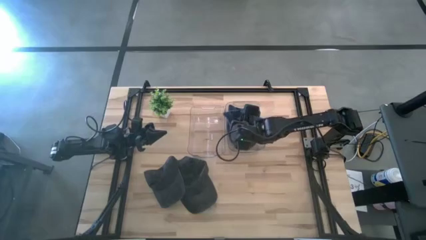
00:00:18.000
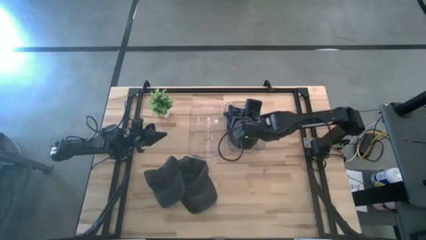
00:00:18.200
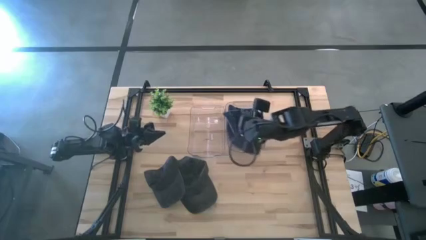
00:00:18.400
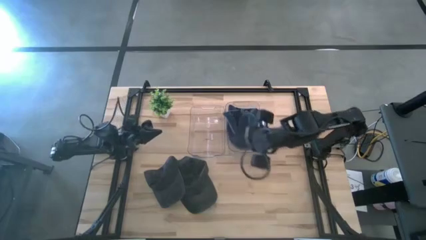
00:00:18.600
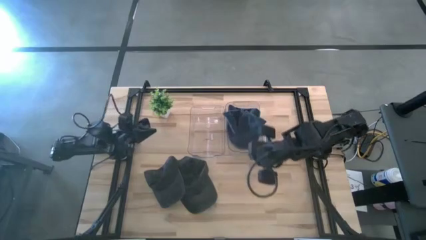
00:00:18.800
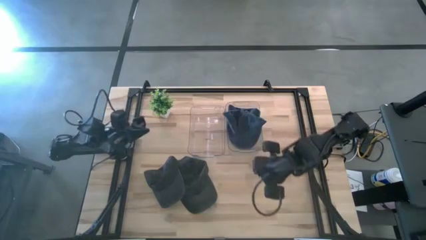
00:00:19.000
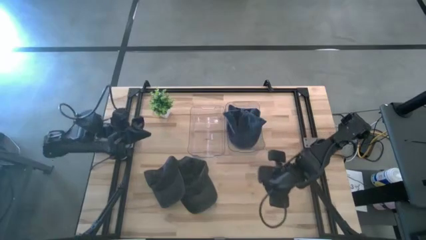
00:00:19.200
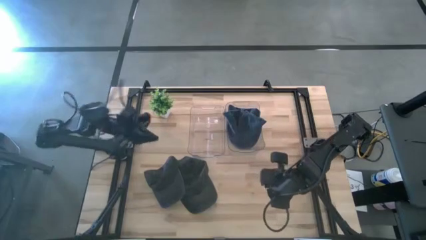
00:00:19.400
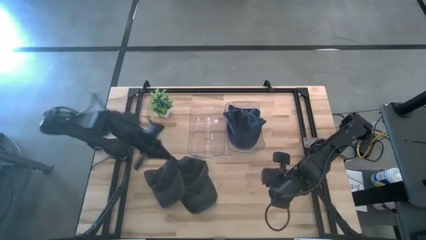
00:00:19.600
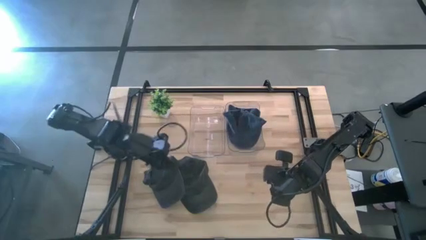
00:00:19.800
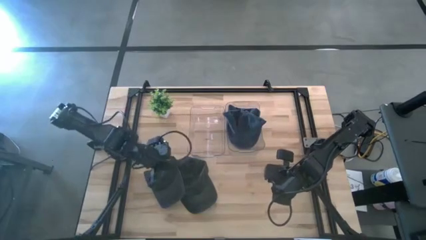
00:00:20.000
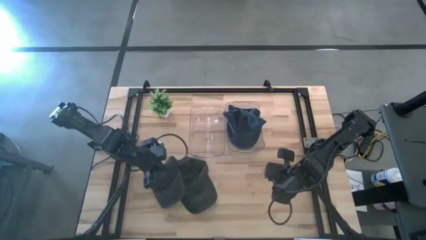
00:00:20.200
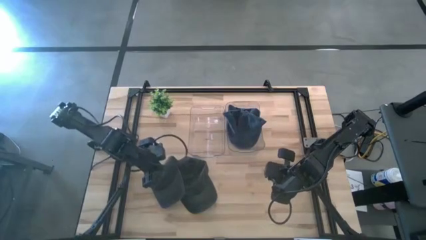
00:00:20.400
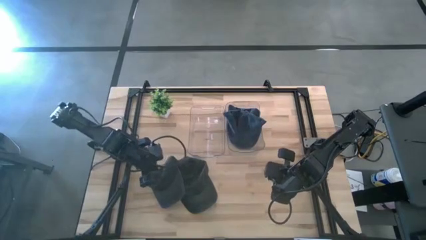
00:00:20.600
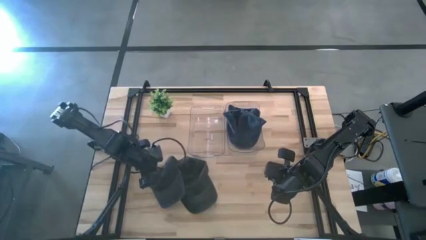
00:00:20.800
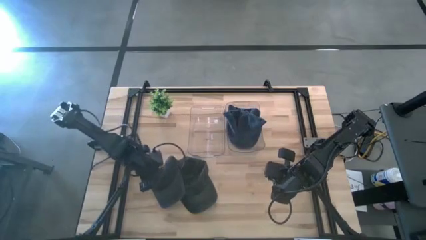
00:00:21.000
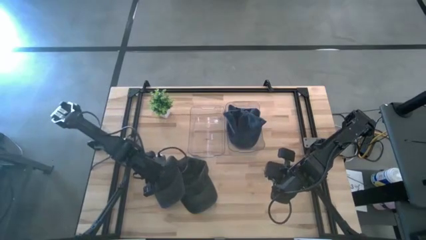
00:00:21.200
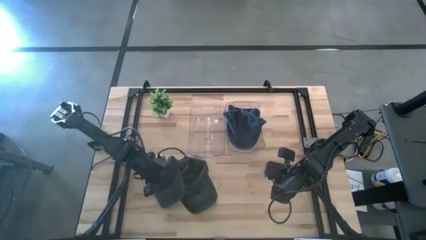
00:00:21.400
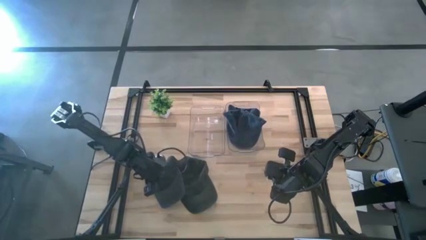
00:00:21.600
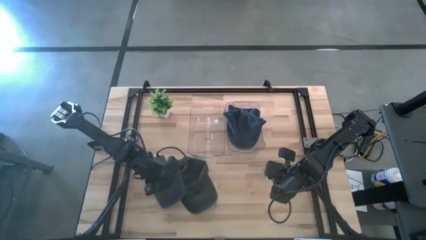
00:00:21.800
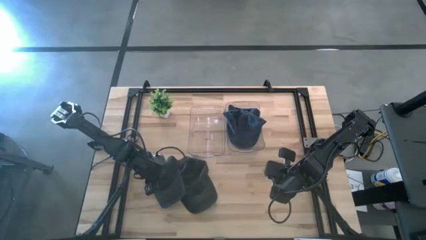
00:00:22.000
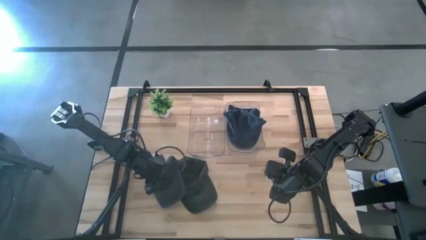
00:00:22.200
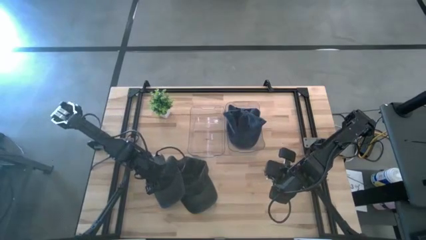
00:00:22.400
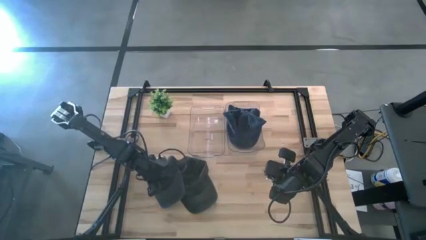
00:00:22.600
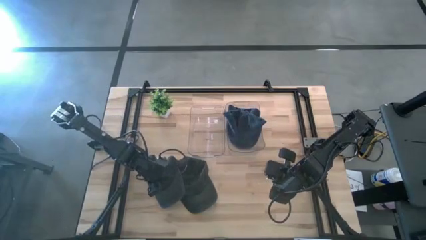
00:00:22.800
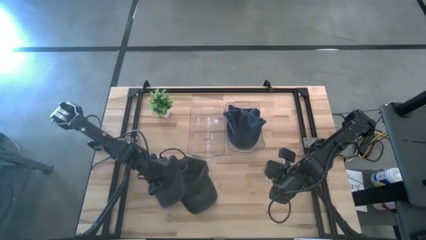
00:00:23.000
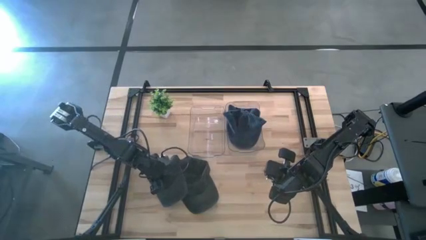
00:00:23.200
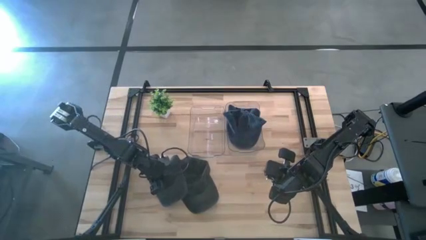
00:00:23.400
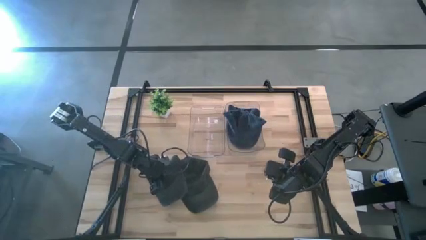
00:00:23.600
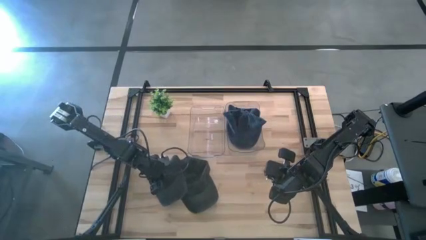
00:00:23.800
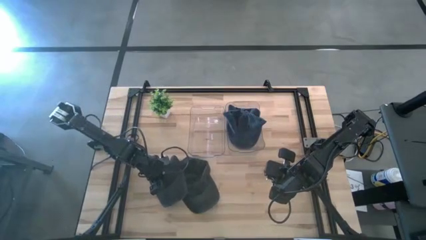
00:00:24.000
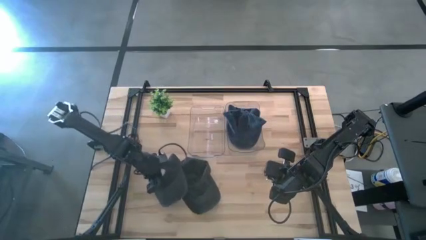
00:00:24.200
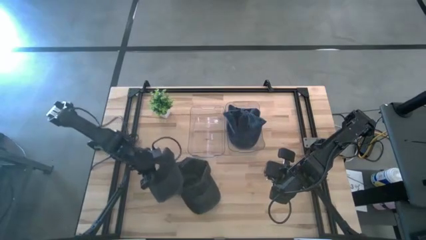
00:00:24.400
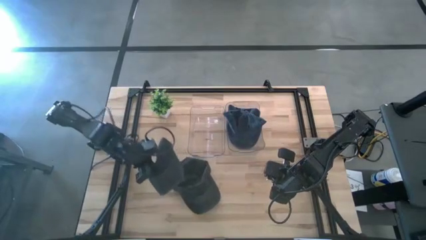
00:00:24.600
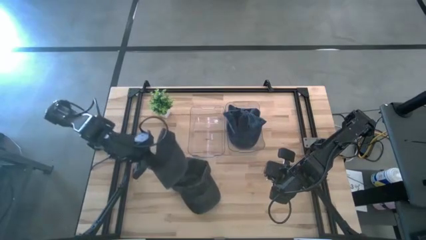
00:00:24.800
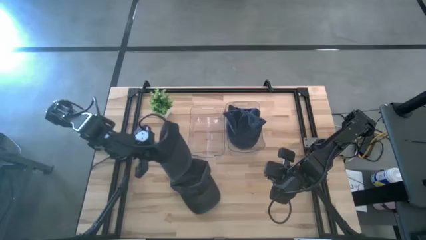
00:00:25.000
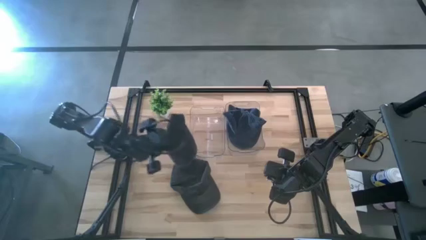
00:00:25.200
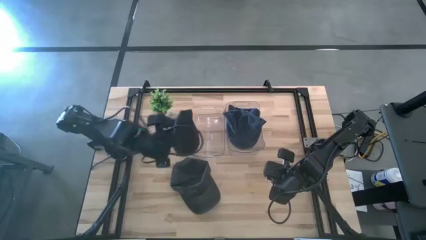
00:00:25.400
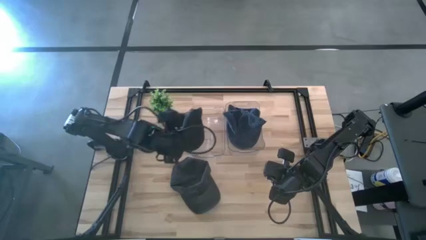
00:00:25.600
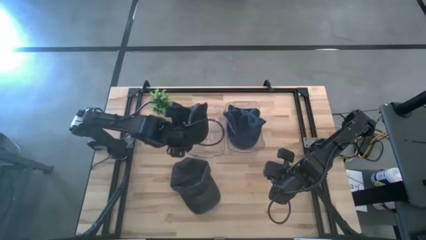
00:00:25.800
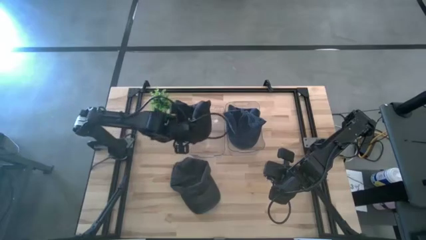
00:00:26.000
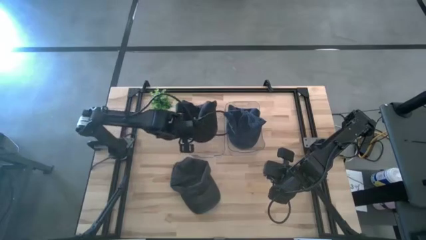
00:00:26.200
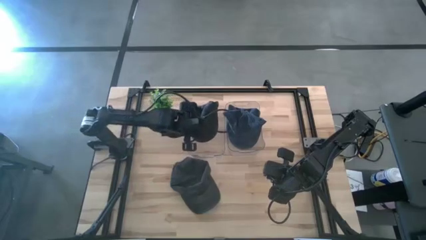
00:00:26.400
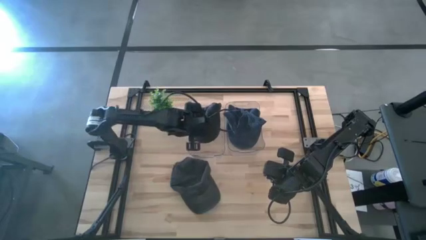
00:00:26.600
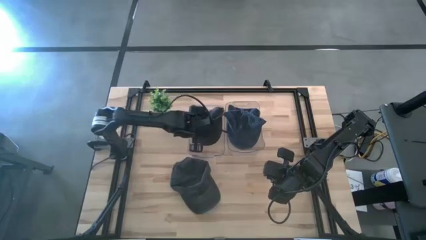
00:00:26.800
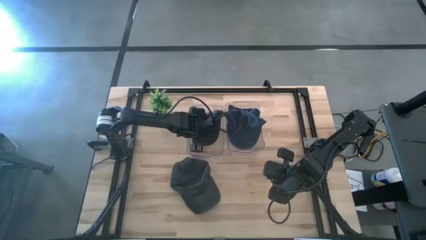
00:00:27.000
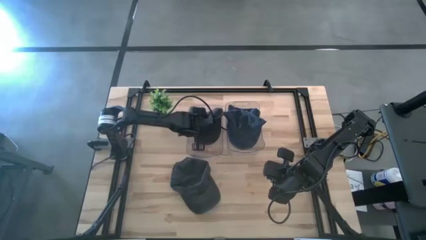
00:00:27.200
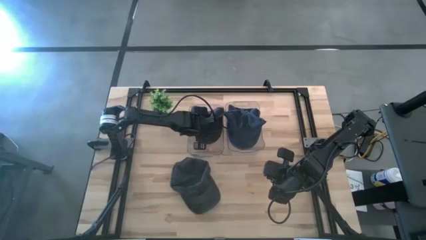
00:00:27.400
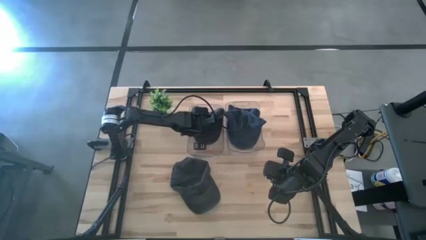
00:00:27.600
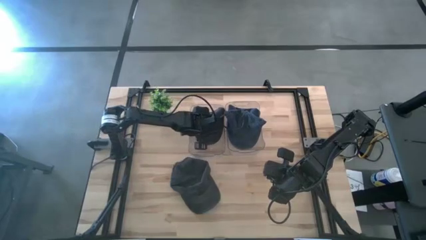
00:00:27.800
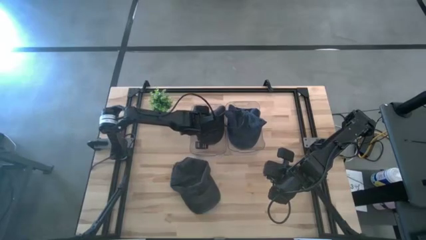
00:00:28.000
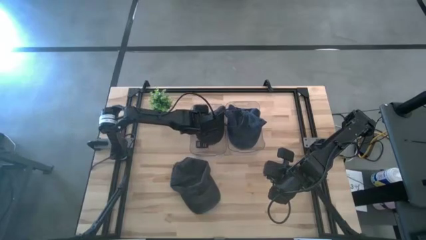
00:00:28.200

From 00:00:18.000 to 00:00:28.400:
Task: Pick & Place hat
Put the left gray cap into the left transparent bin

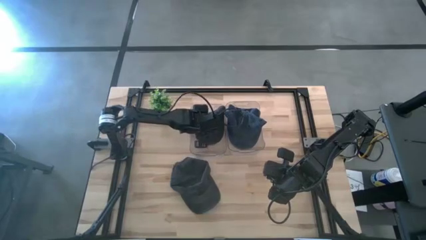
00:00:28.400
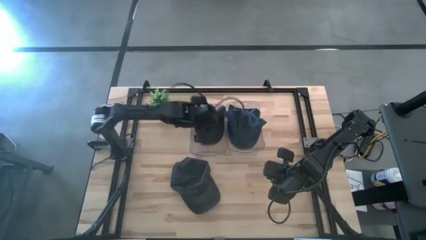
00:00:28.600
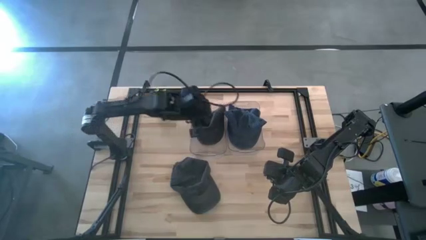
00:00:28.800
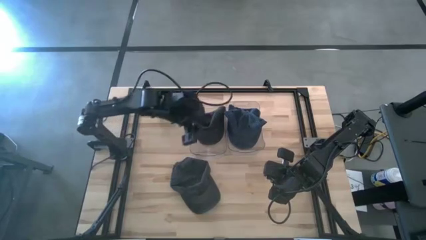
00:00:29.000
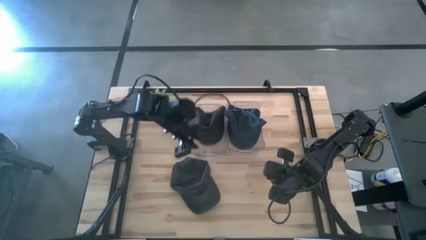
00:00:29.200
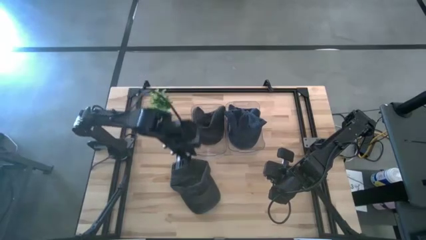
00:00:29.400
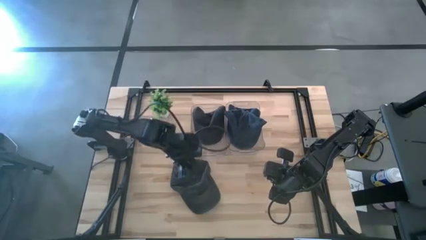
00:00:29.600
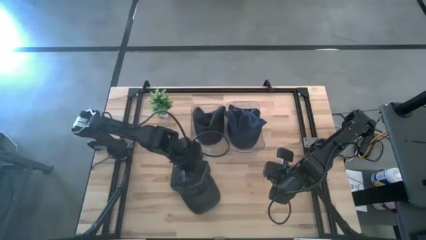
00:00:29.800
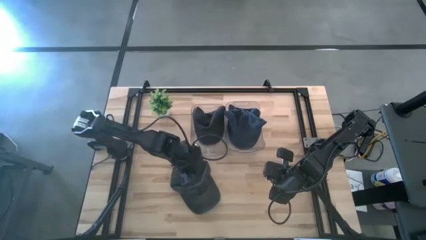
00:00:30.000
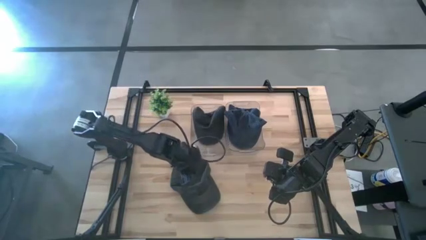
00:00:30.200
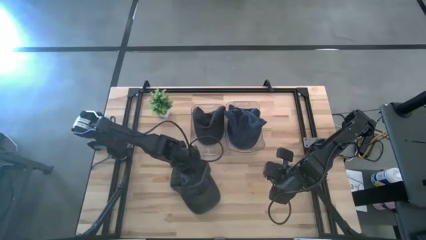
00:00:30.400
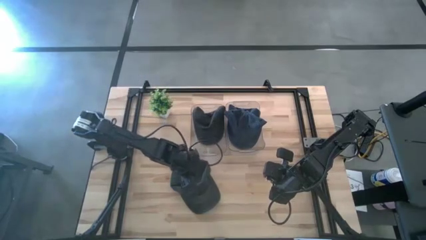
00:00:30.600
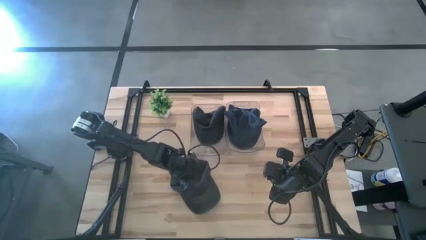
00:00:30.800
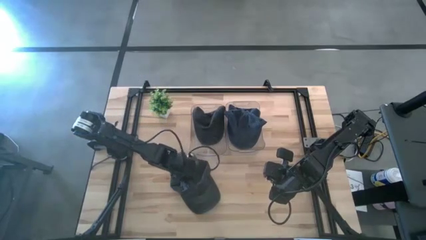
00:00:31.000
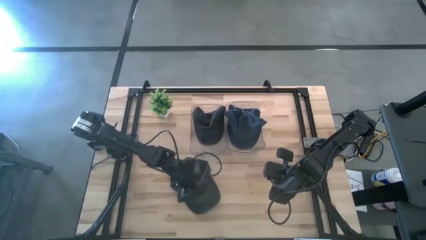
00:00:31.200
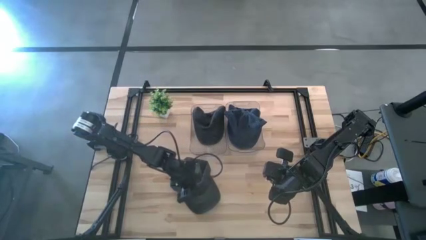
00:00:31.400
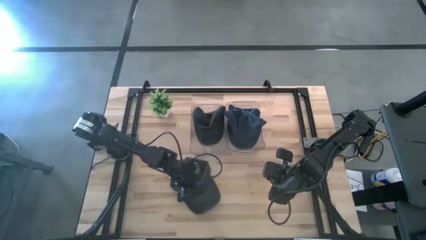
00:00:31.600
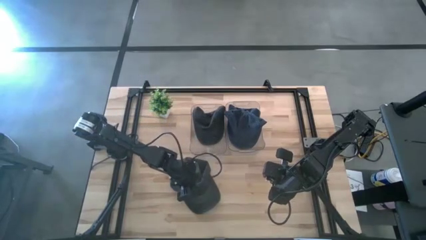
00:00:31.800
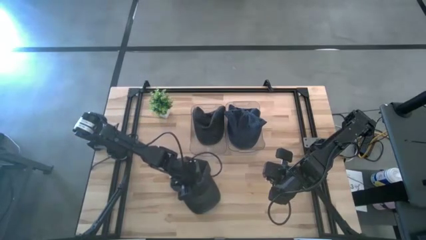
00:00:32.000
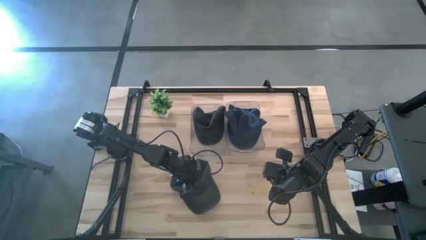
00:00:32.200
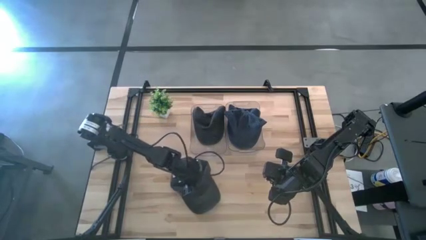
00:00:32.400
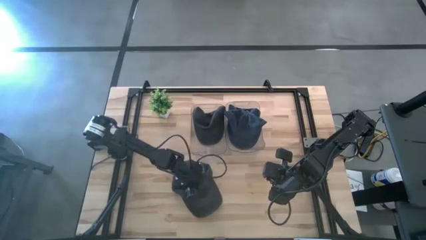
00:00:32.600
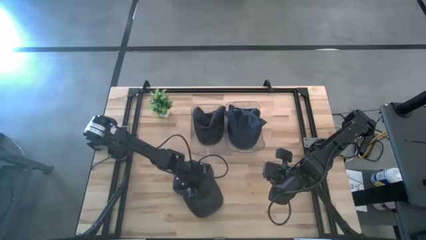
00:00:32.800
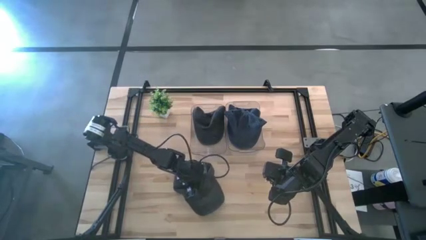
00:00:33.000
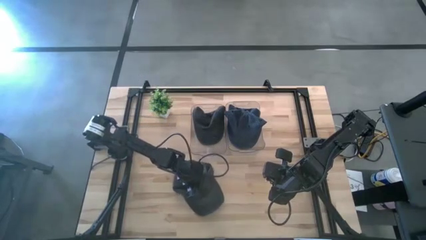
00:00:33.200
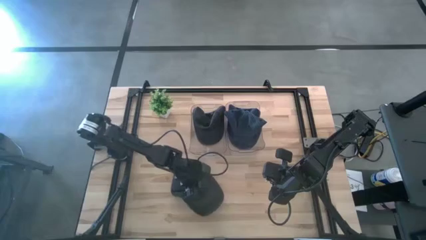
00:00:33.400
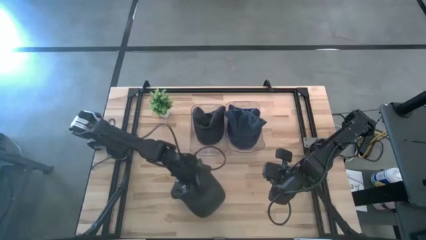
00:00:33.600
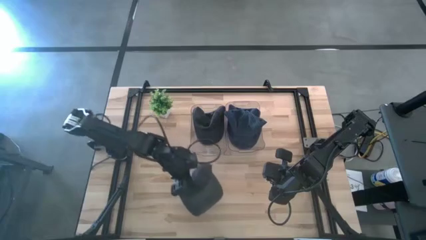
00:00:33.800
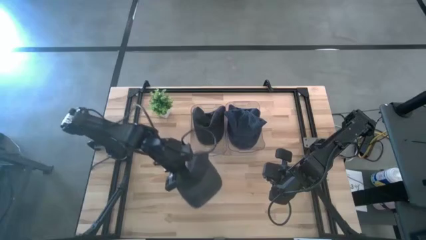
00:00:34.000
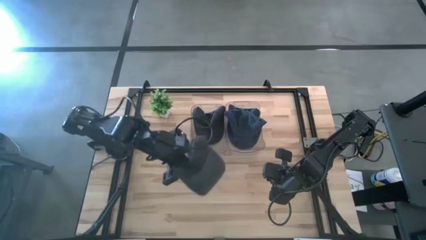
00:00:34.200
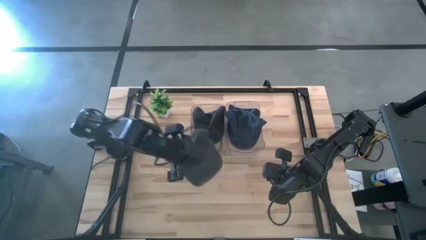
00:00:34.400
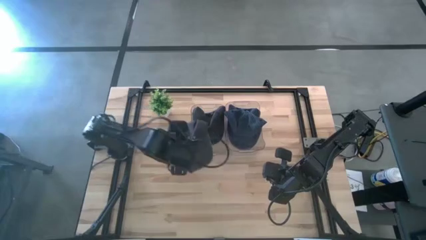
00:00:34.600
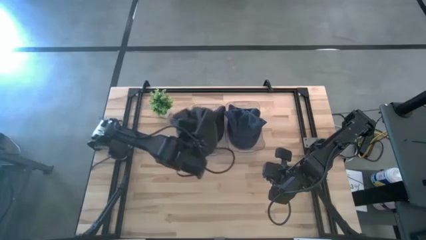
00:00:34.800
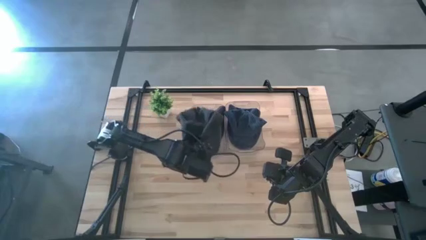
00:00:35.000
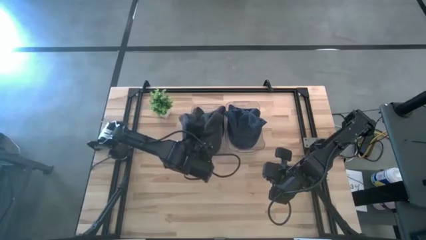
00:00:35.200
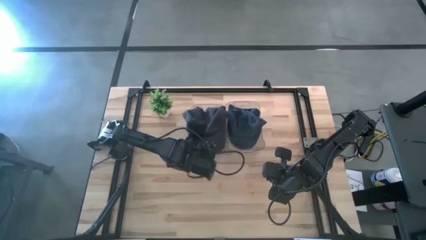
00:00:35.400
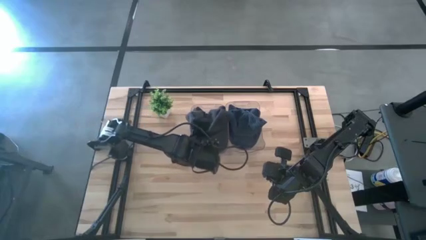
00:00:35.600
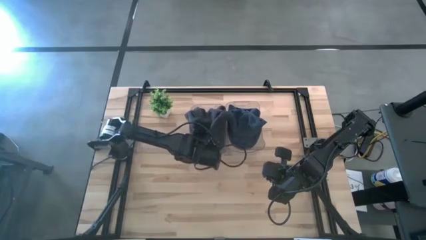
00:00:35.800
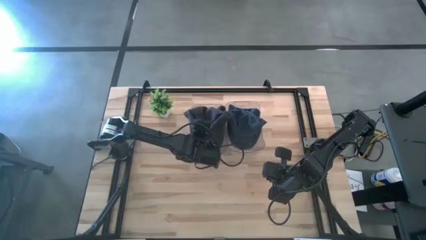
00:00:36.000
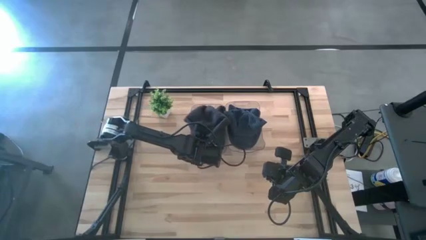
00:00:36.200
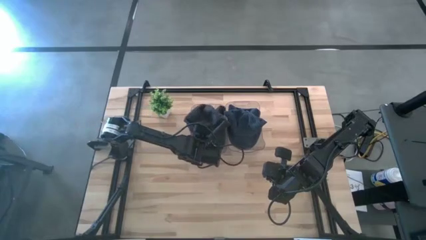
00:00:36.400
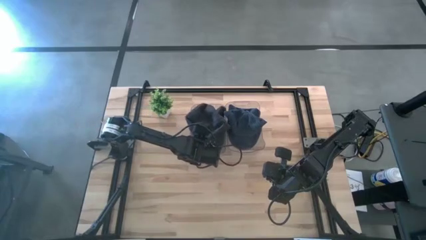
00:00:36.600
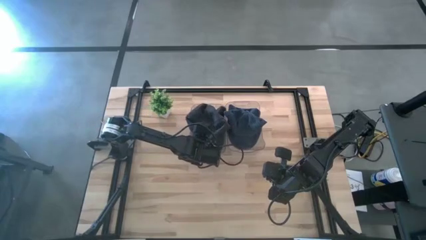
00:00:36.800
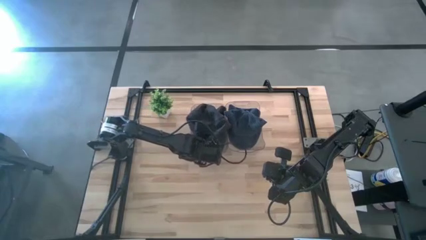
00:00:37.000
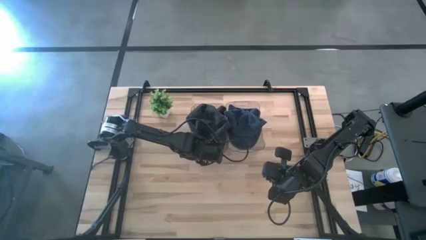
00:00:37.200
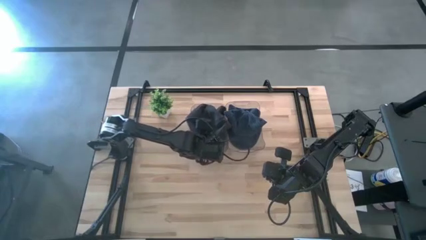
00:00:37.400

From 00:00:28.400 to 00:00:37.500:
Put the gray cap into the left transparent bin
